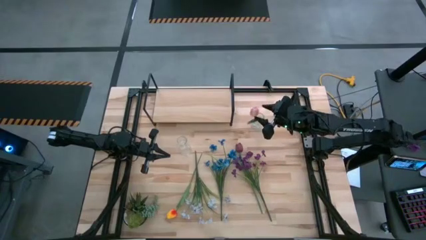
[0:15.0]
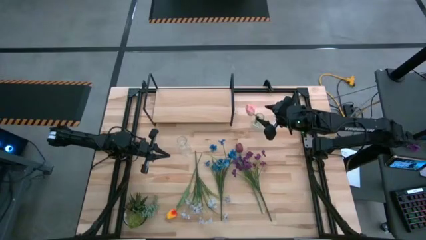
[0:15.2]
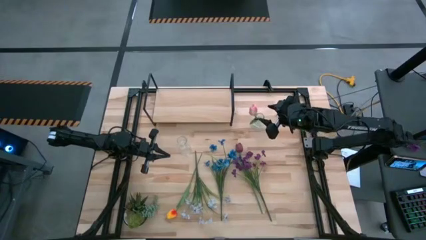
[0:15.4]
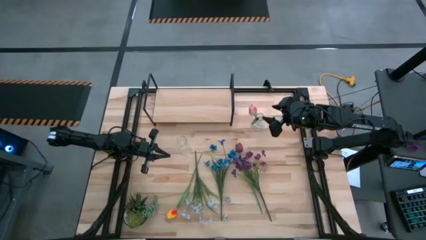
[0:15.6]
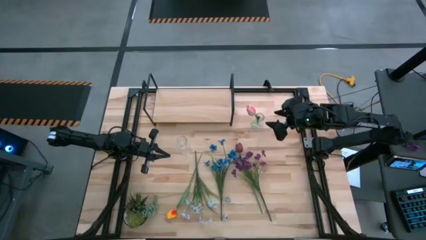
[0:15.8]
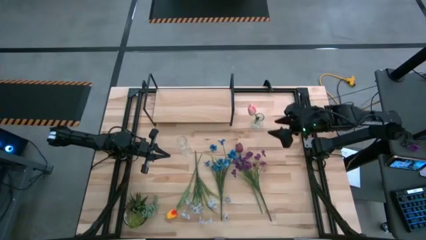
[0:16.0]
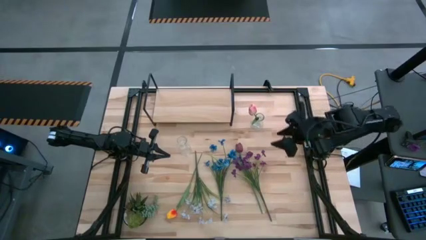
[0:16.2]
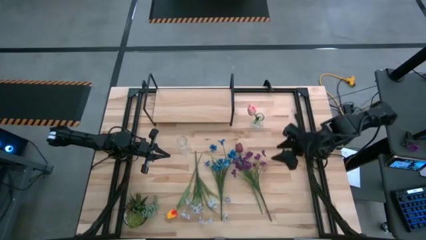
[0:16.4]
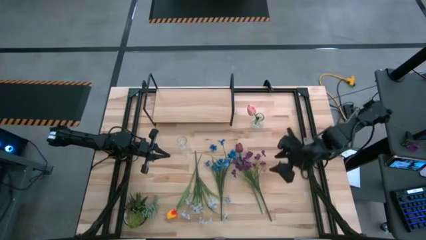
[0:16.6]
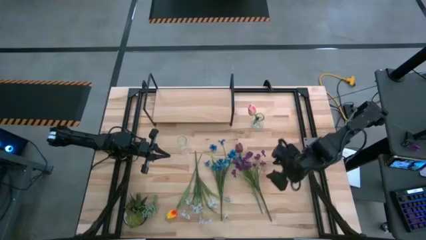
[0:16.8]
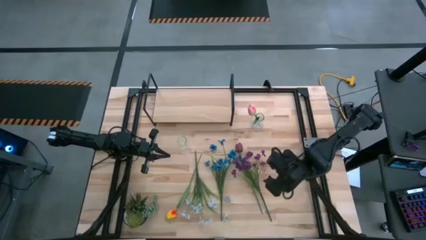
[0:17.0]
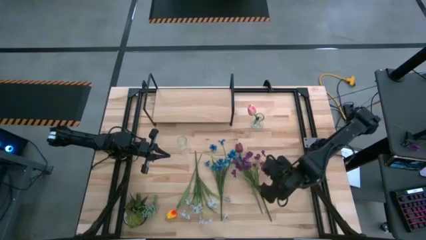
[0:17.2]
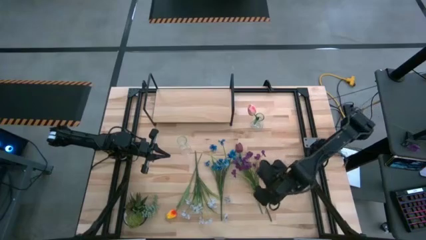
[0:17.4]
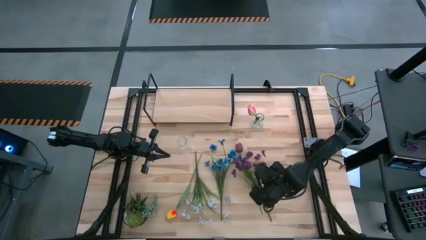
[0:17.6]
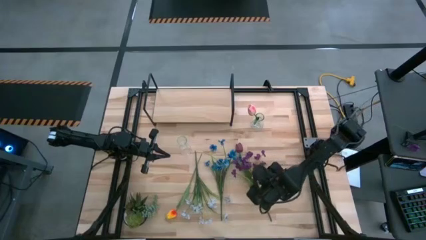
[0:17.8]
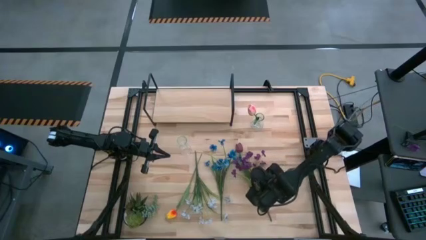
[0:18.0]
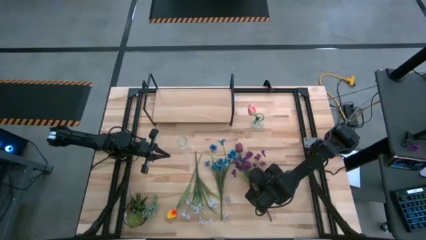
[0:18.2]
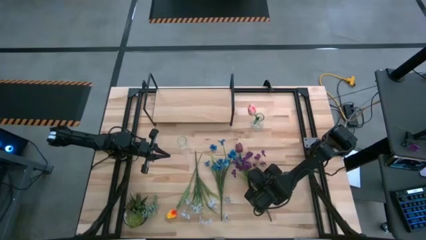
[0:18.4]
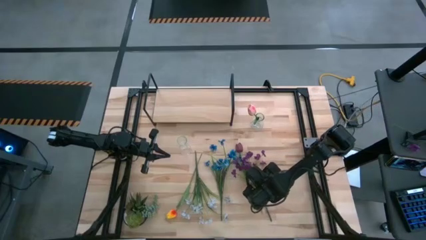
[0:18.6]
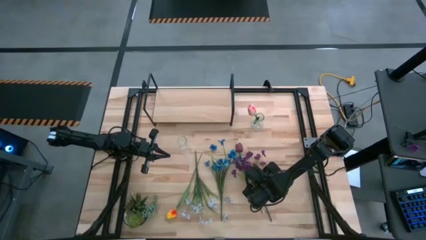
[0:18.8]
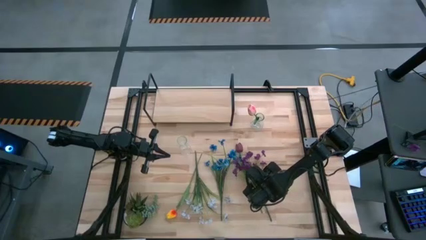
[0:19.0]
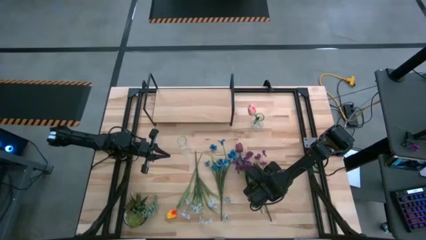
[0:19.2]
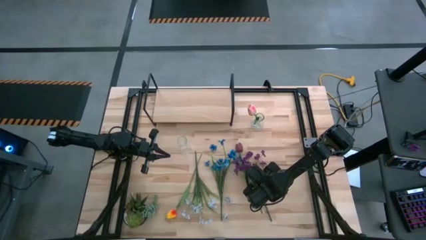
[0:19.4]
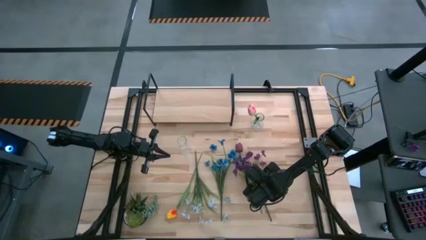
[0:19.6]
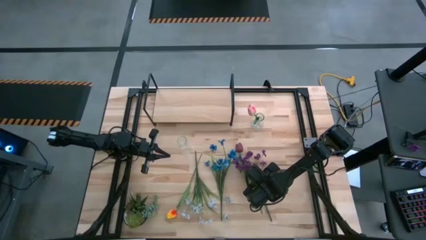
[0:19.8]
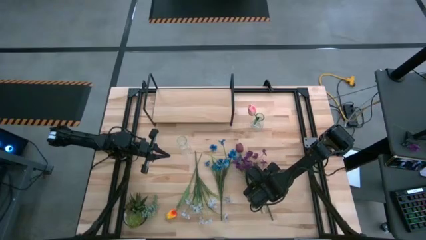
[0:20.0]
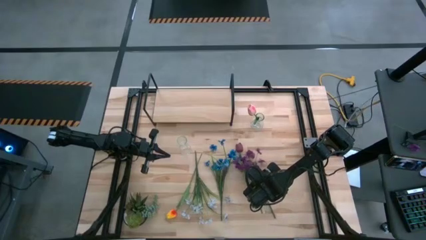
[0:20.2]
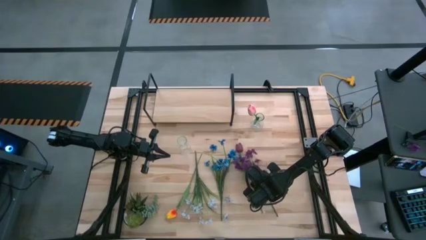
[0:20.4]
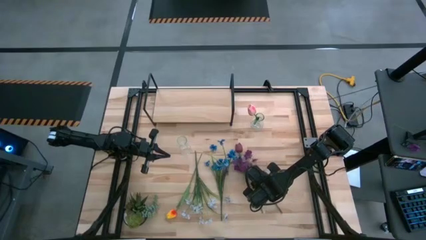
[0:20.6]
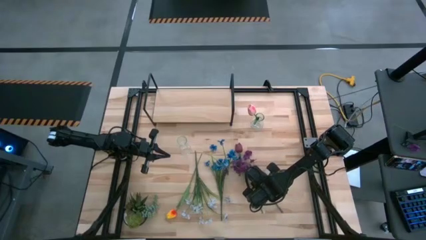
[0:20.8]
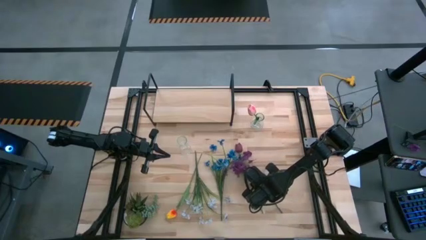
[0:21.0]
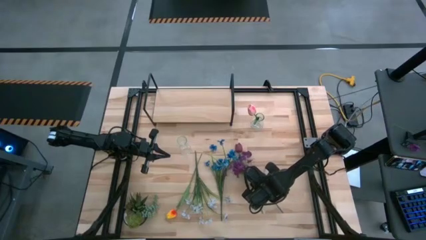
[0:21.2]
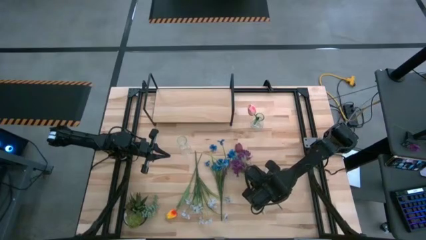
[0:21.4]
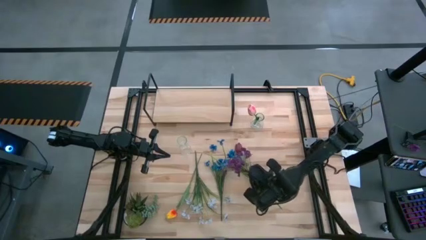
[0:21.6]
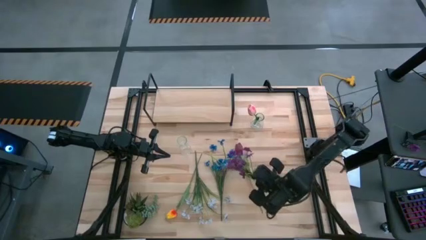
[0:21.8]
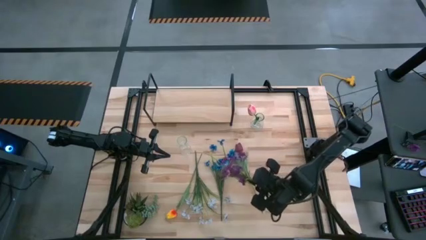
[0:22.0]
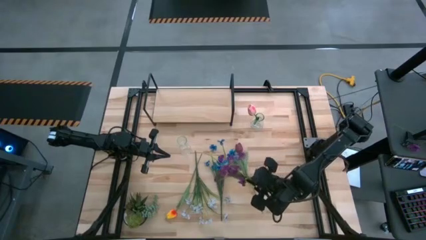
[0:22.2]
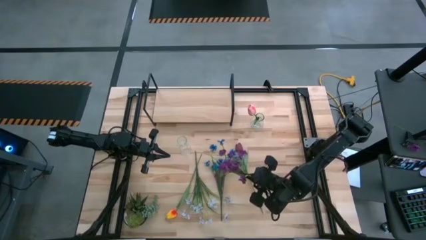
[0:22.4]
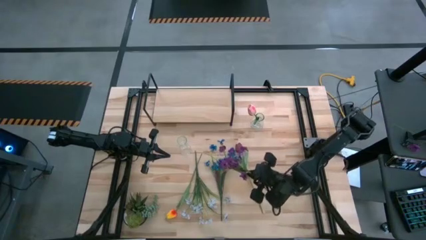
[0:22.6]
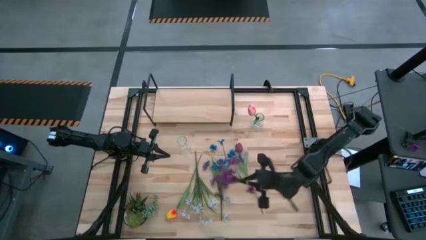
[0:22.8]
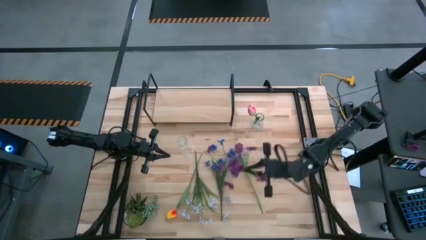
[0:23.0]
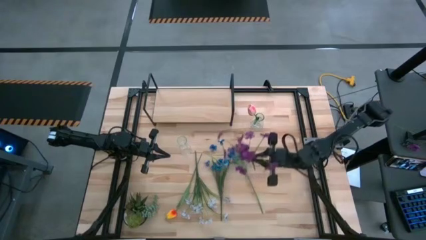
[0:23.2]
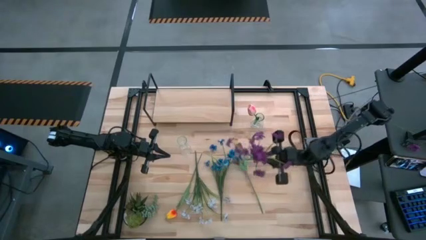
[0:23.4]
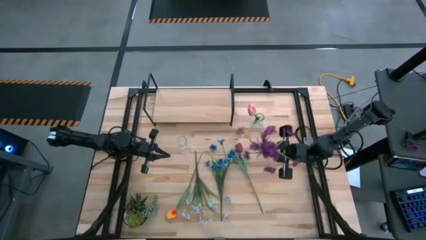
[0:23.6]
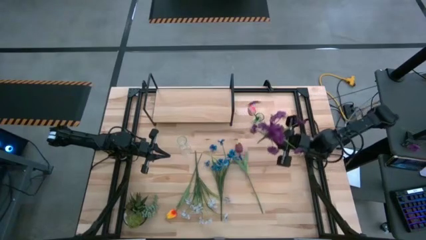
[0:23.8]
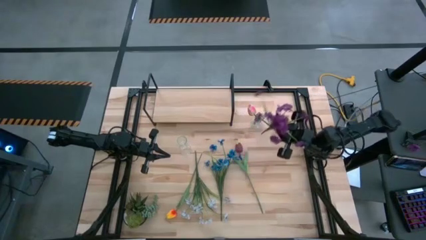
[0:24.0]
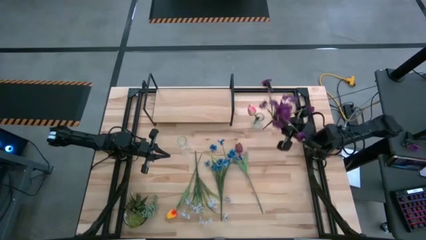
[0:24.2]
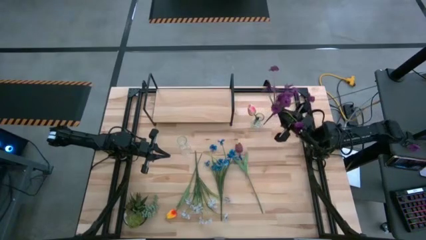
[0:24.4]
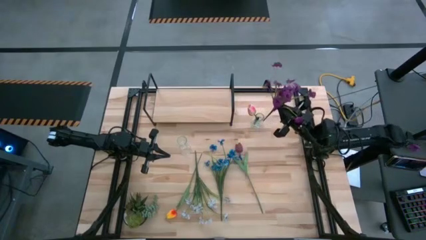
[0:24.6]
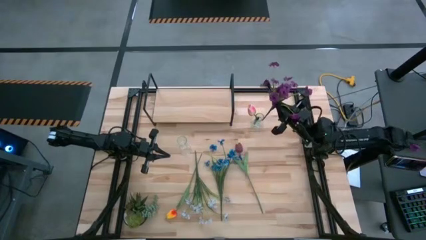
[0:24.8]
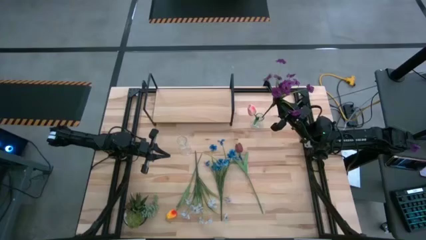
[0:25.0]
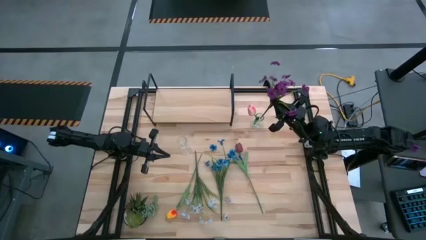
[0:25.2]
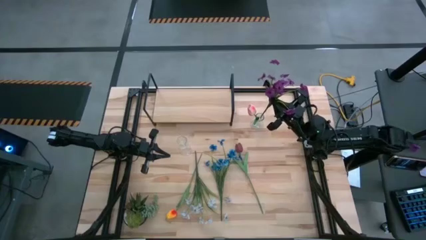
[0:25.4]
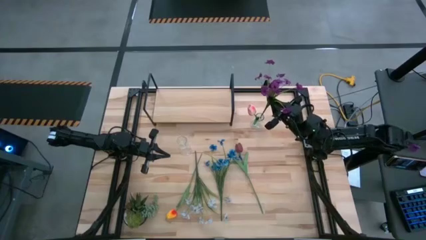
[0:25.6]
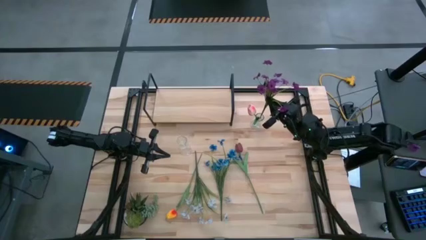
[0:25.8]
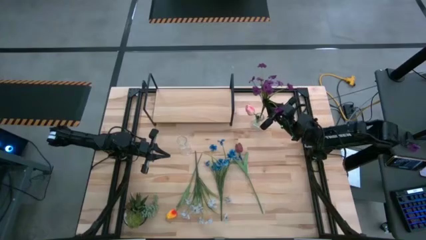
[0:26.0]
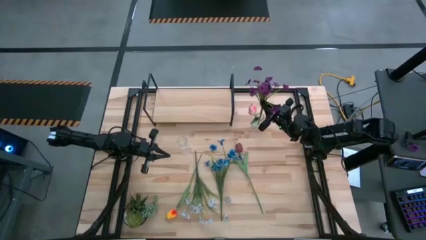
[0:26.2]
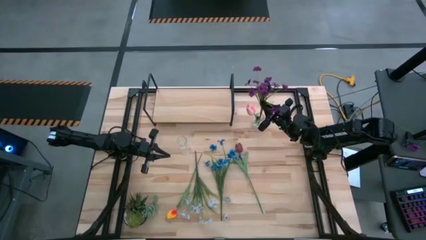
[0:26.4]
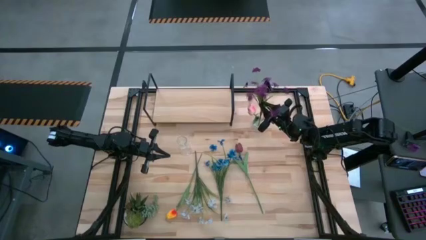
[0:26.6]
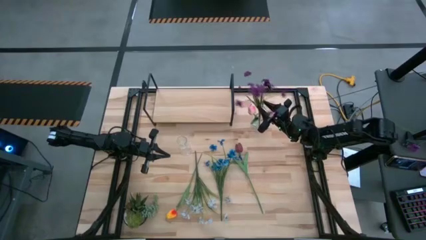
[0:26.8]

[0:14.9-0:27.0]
Task: Pick and place flowers into a vace then onto a shelf
Put the violet flowers into the right transparent vase
